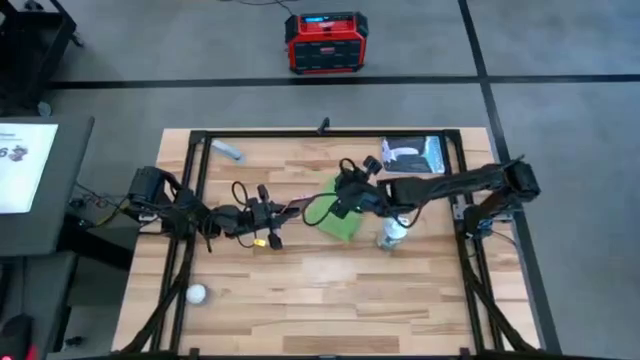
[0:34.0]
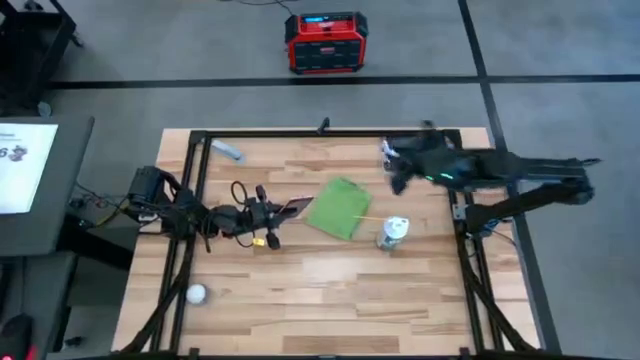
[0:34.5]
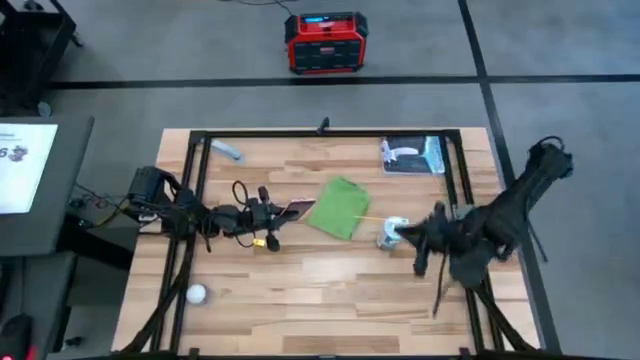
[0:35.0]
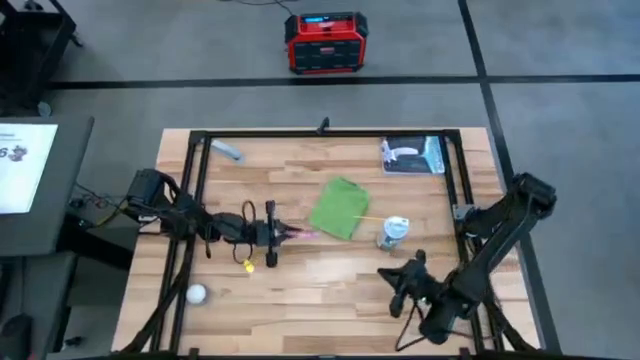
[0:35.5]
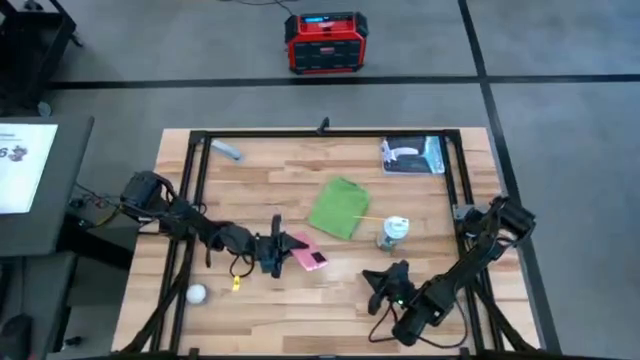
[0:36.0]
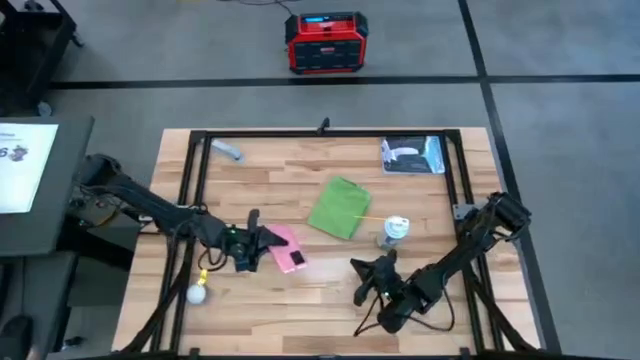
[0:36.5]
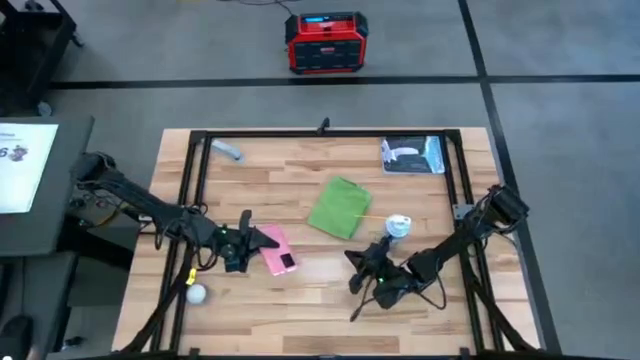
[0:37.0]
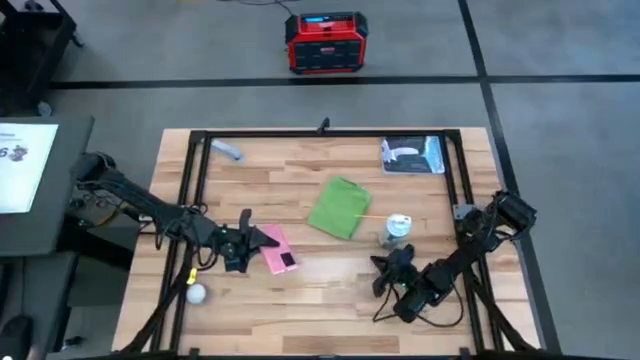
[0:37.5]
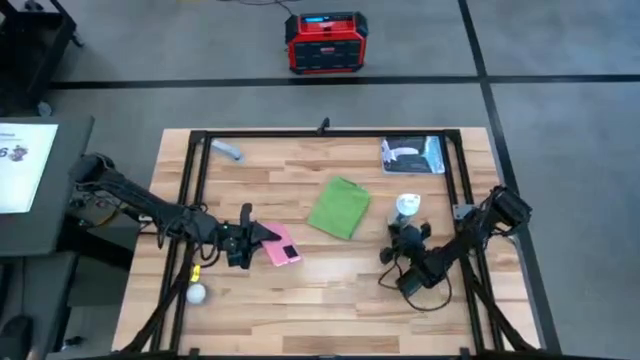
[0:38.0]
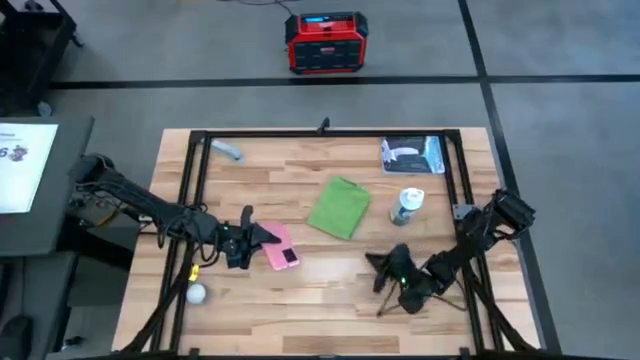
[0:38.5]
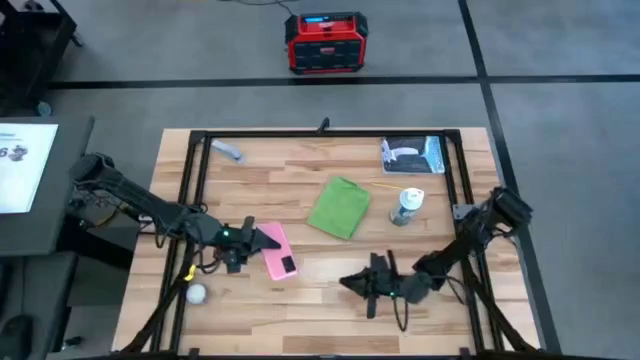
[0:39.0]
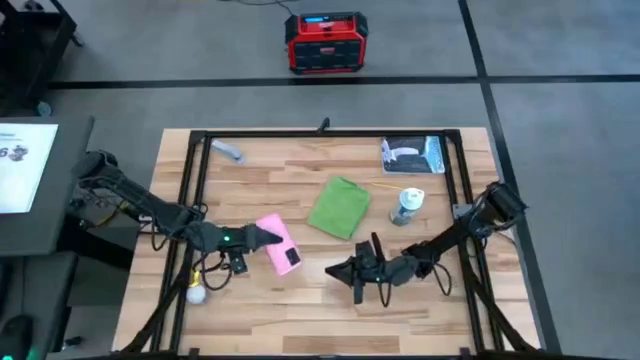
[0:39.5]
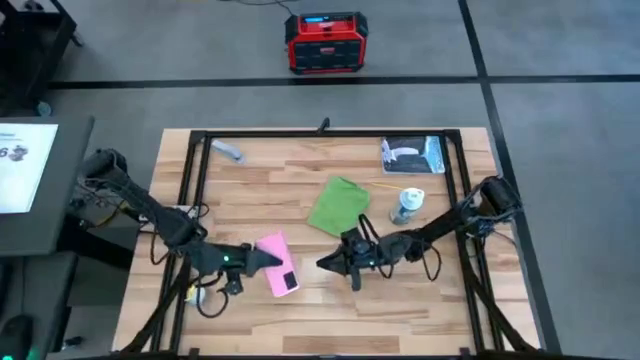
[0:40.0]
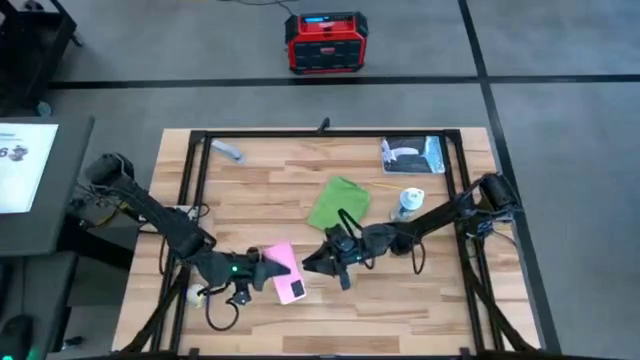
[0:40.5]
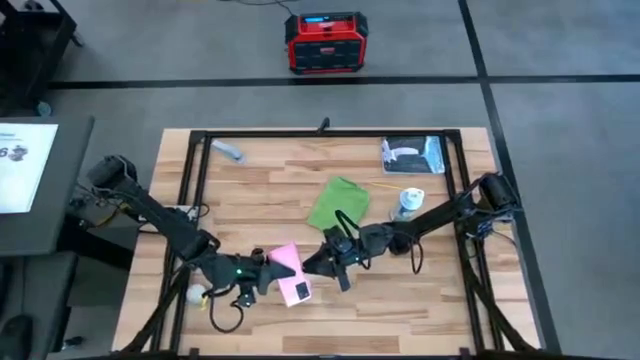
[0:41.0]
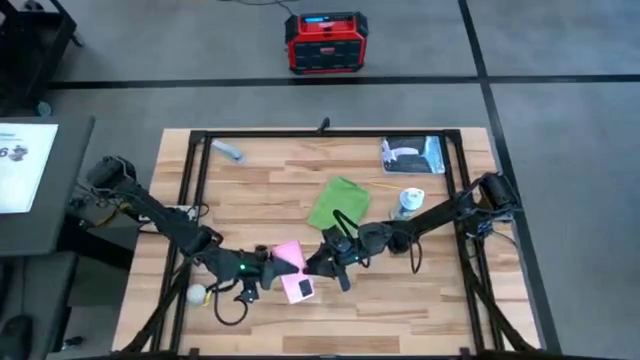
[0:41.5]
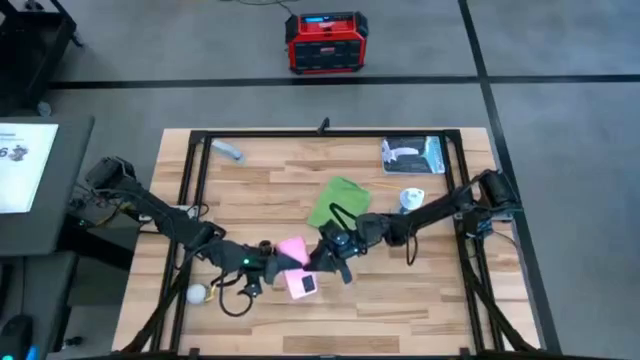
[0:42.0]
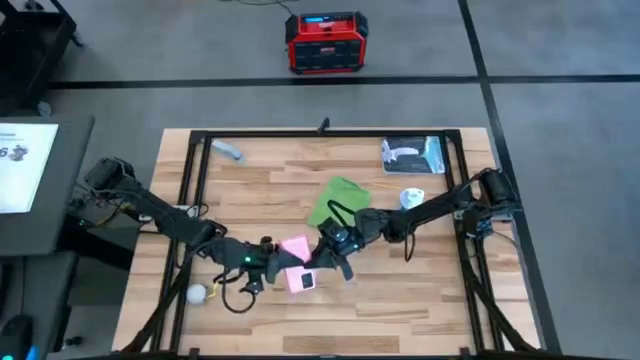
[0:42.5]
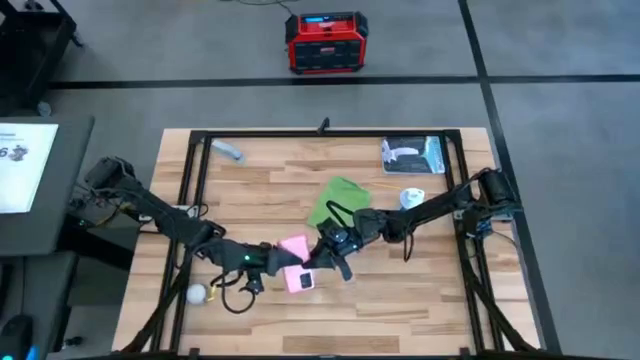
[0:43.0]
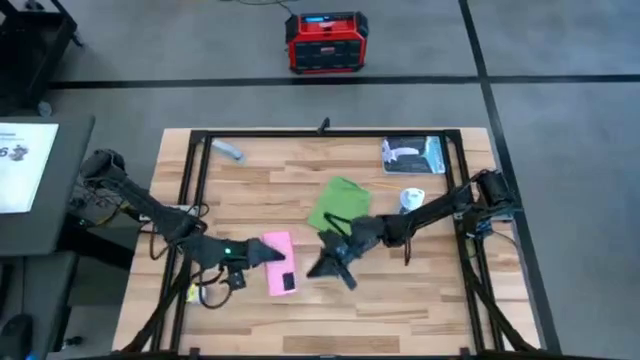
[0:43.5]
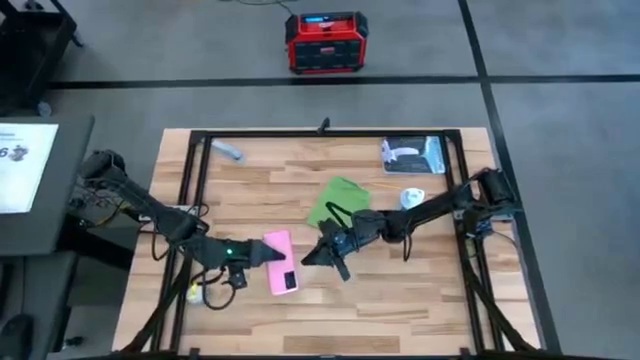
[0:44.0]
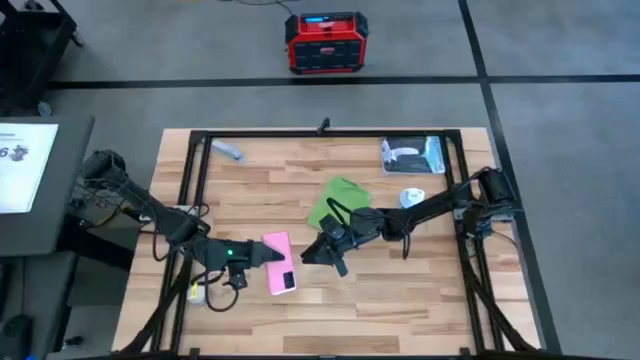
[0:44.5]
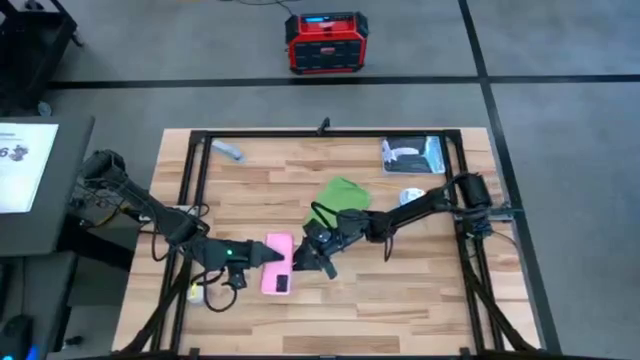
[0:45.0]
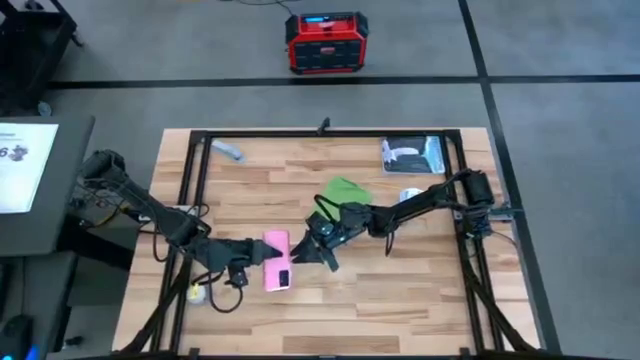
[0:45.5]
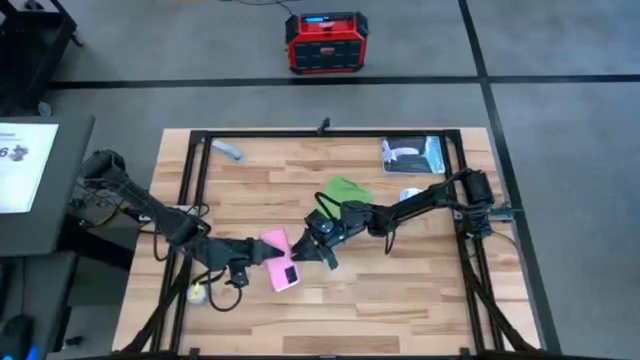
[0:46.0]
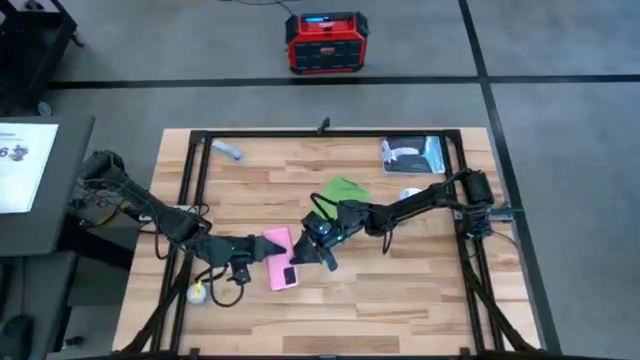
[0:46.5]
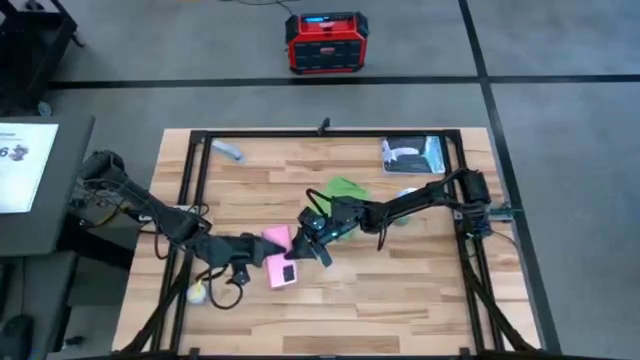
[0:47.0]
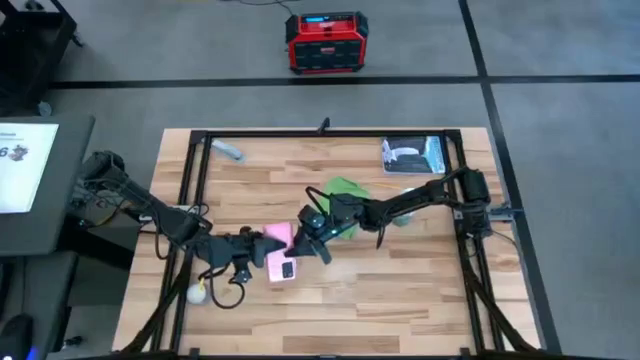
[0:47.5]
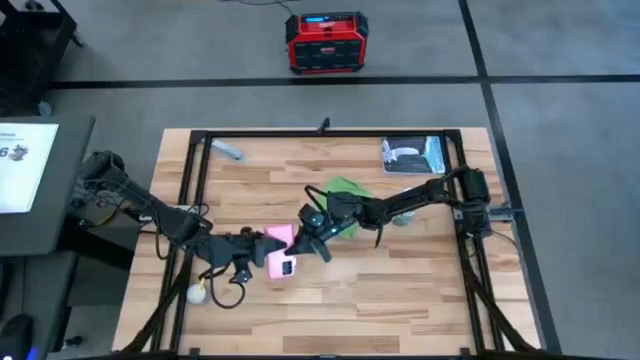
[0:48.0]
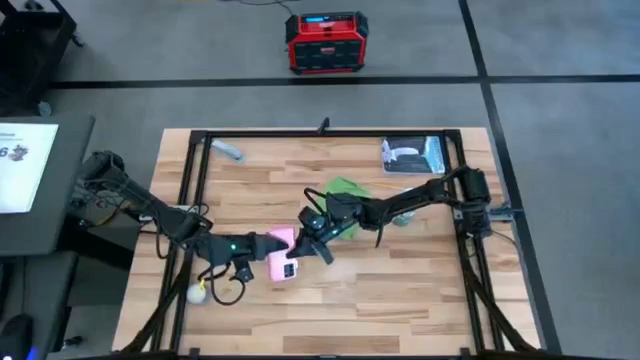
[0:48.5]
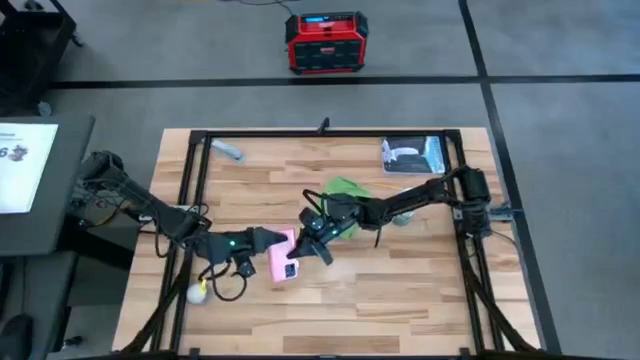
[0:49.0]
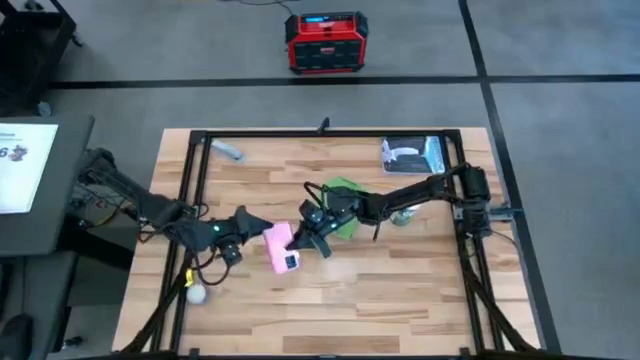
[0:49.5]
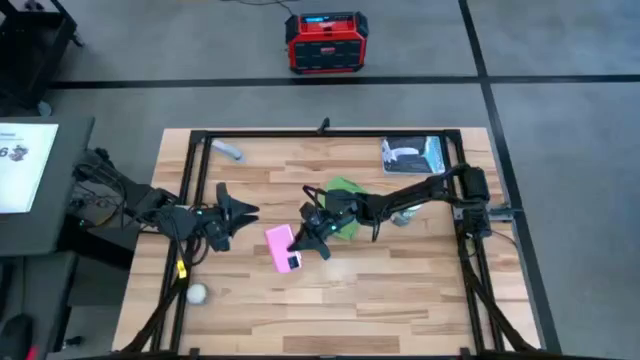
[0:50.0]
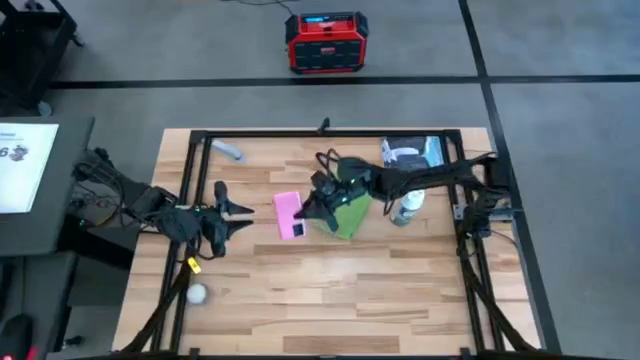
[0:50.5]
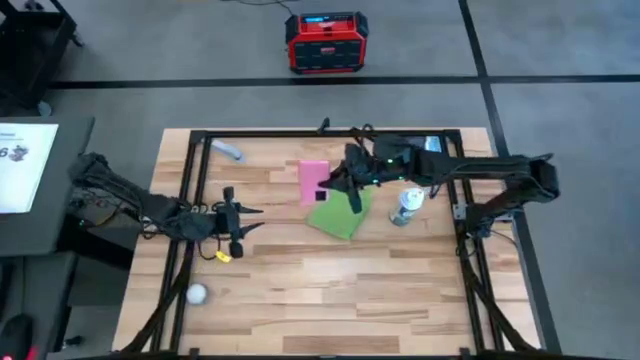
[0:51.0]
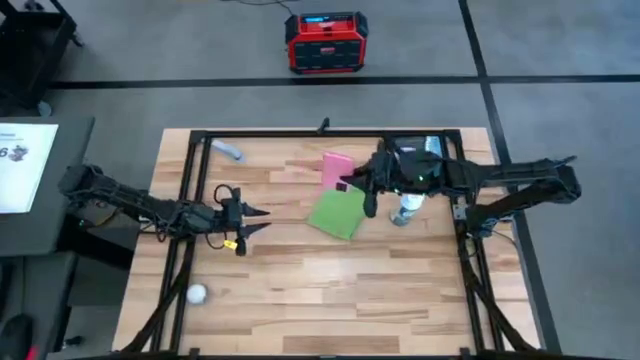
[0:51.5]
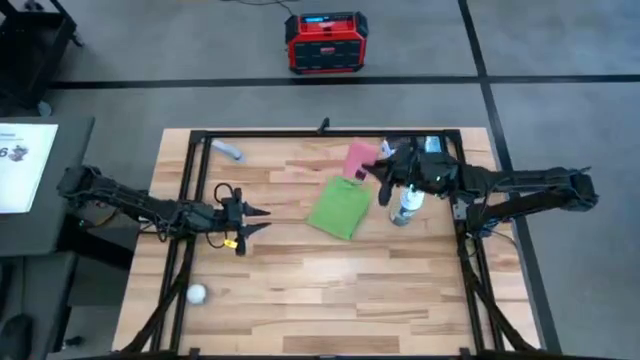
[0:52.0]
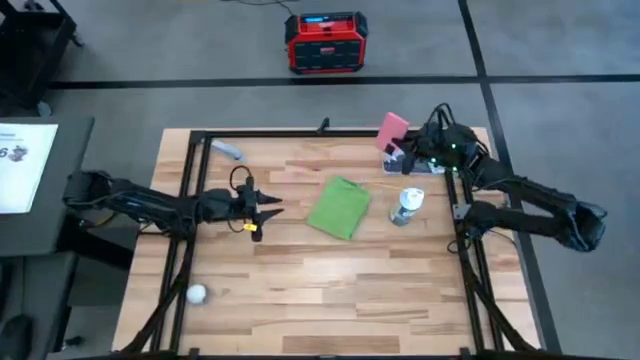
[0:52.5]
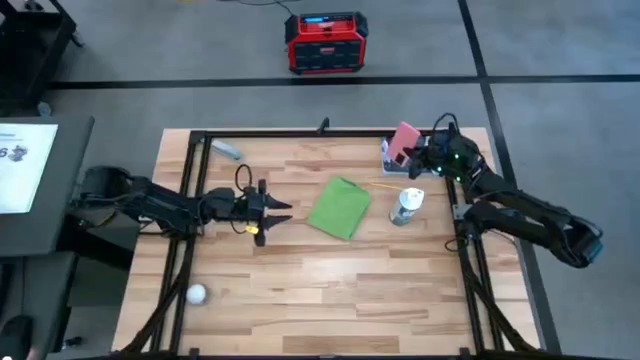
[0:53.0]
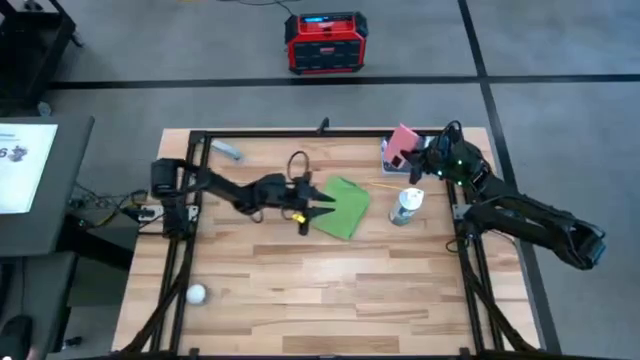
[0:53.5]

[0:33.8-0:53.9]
Task: Apply microfiber cloth
Spray the cellphone using the cleaning bottle
